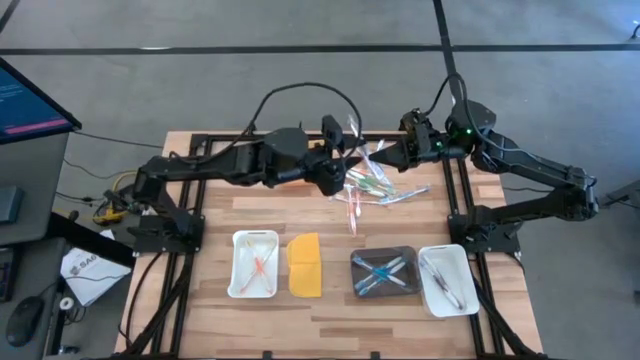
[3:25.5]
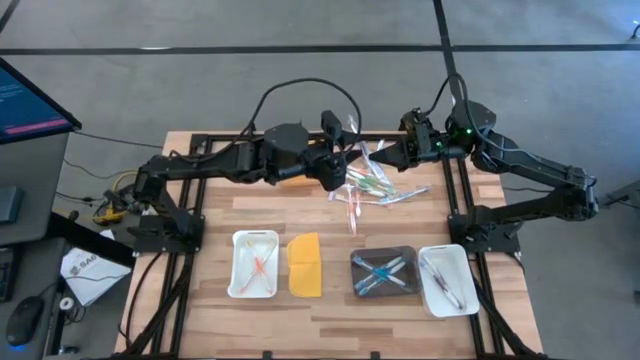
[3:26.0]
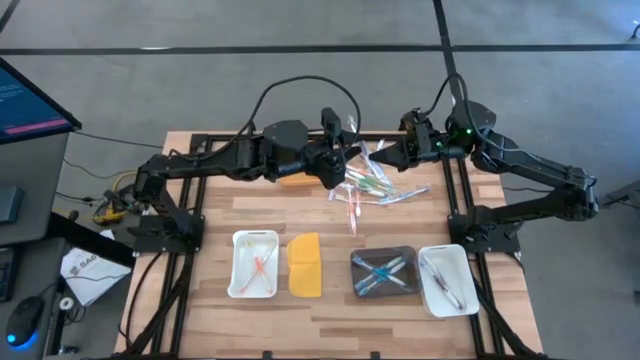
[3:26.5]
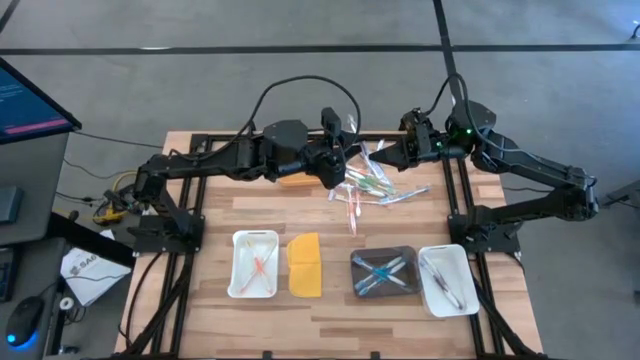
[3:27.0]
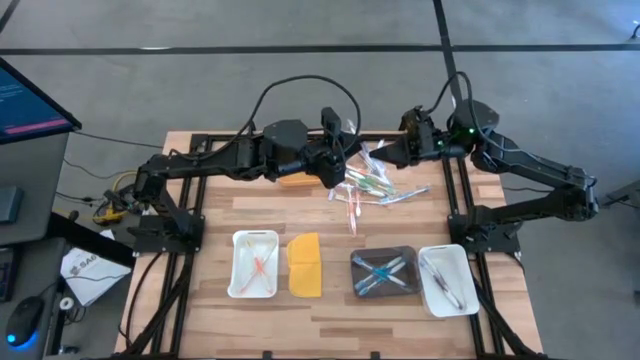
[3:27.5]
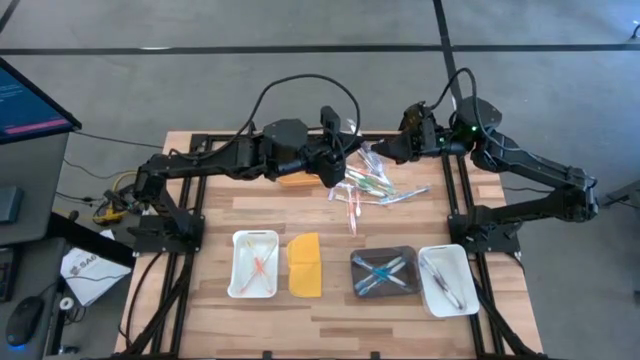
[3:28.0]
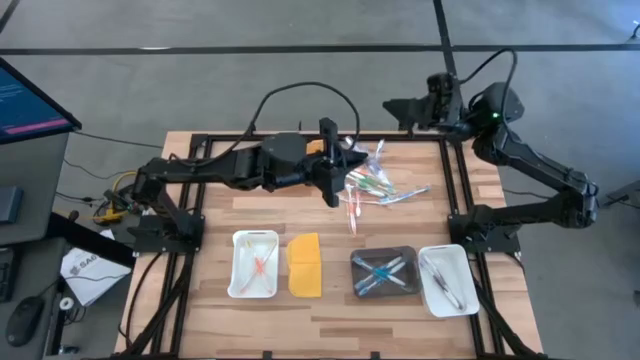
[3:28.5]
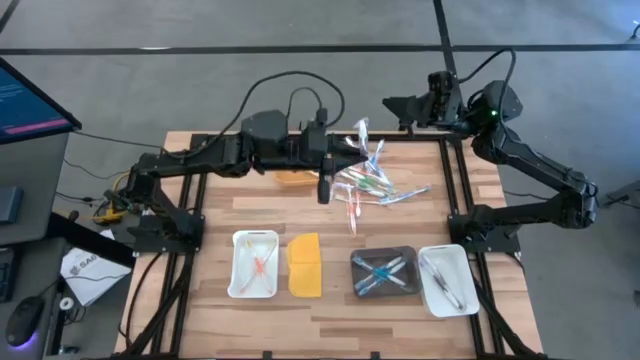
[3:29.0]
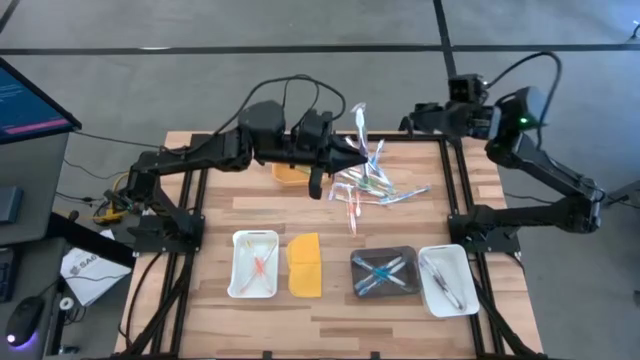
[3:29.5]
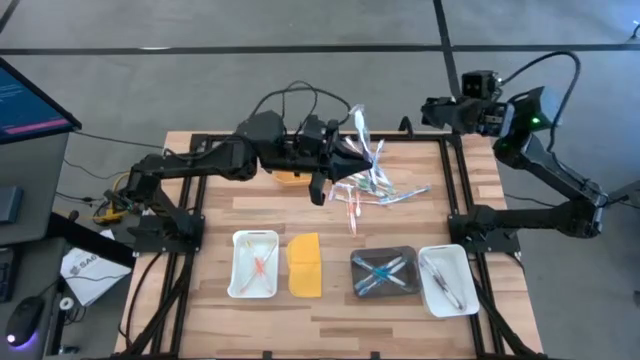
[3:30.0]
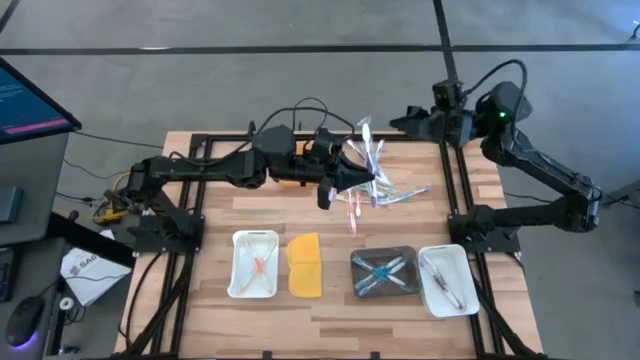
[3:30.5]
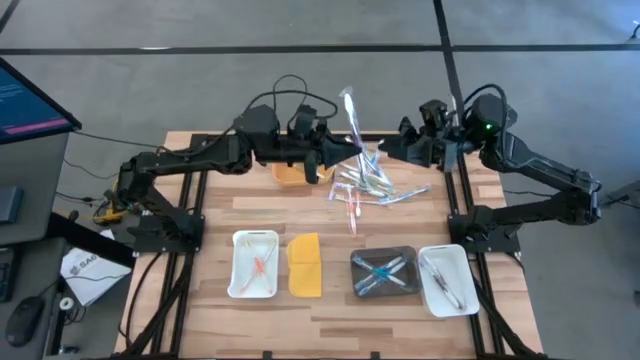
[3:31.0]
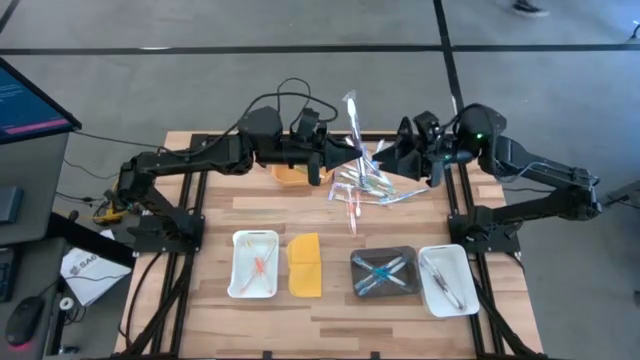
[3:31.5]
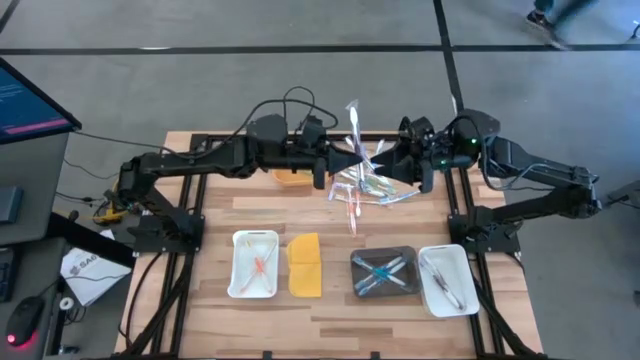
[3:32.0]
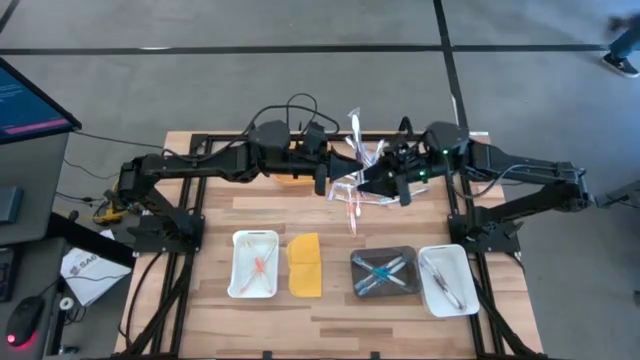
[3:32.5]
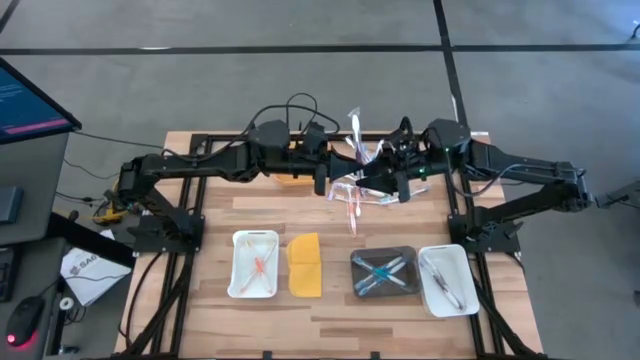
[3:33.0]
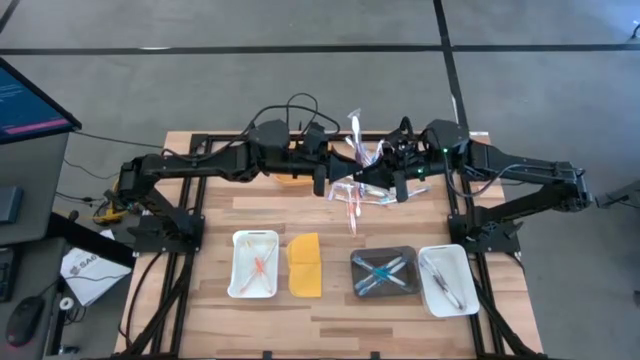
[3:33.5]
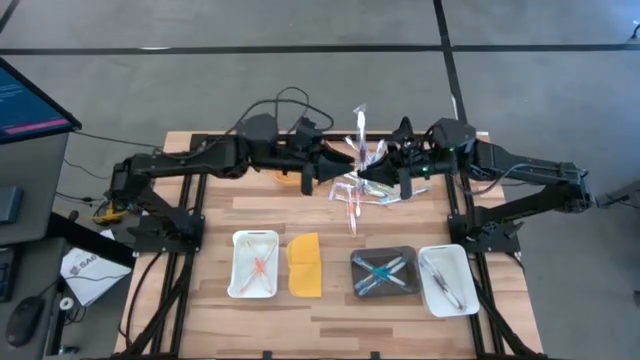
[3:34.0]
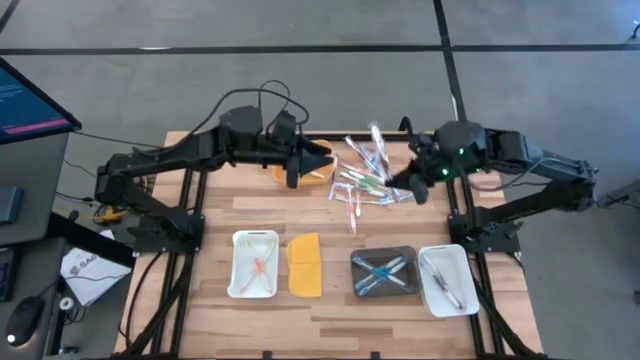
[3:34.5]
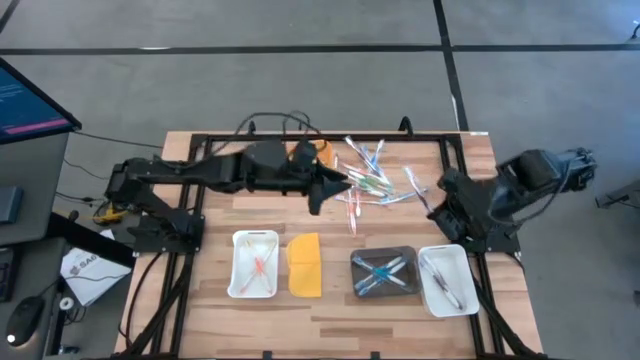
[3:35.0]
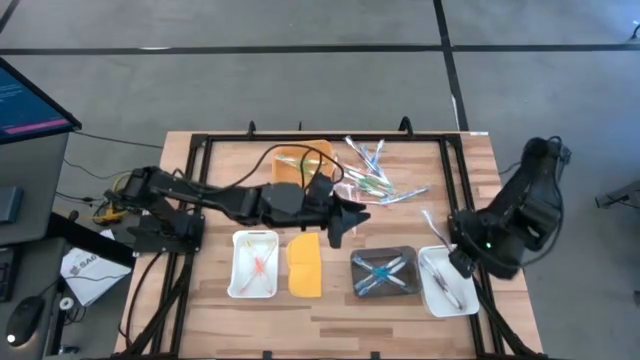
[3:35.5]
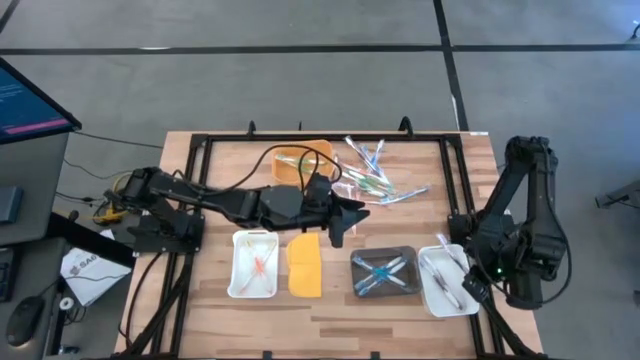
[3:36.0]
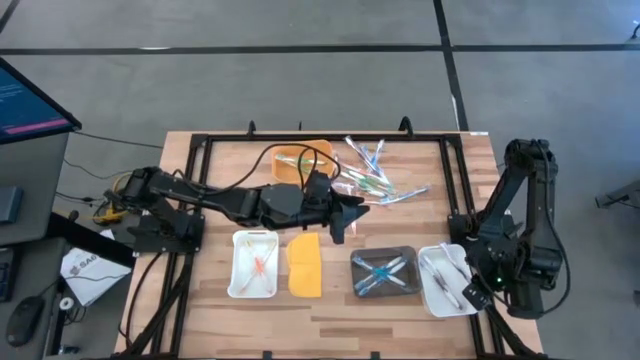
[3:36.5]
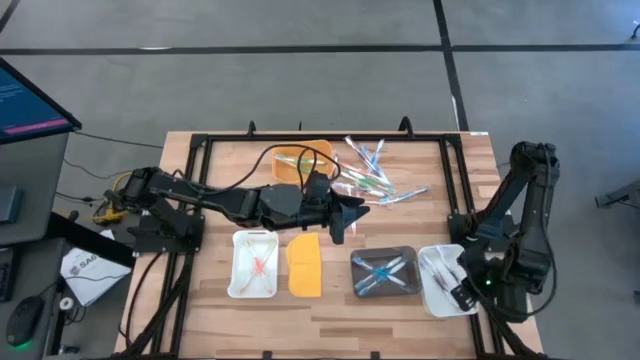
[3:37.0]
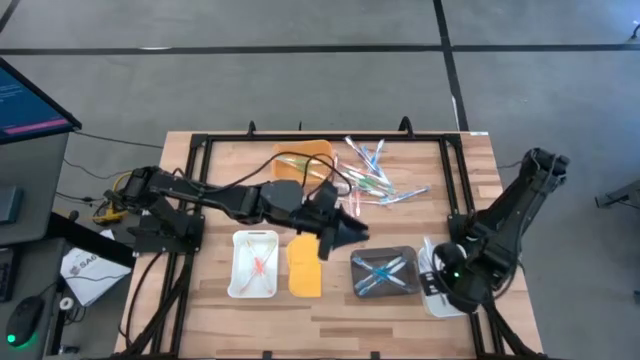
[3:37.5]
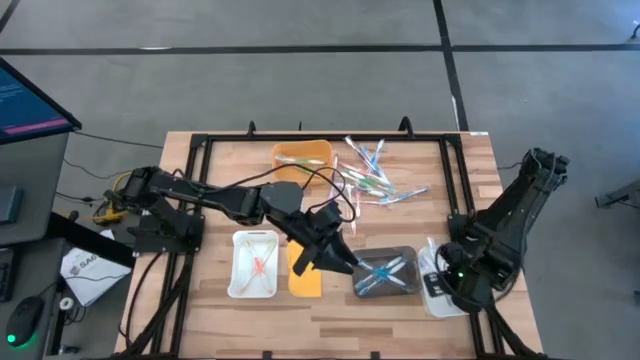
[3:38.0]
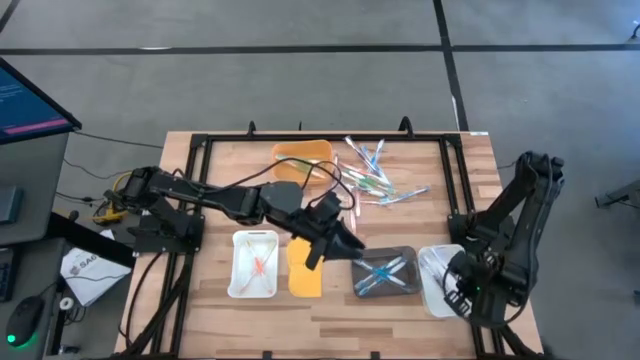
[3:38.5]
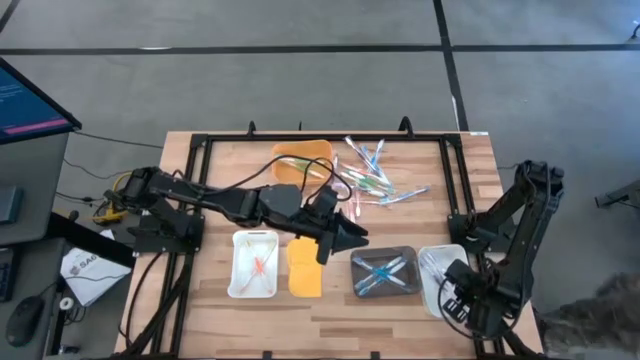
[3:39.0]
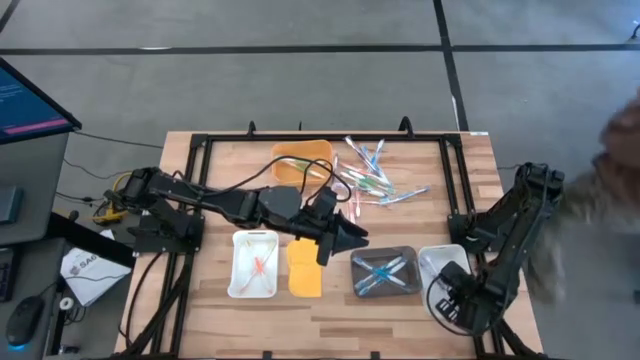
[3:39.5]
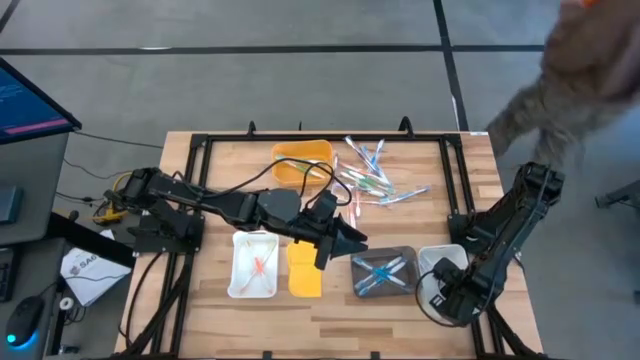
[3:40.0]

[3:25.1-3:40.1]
Task: Pick & Place Toothbrushes
Put the purple toothbrush into the right white bin

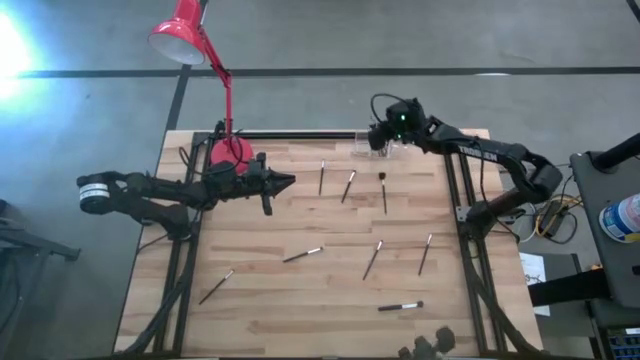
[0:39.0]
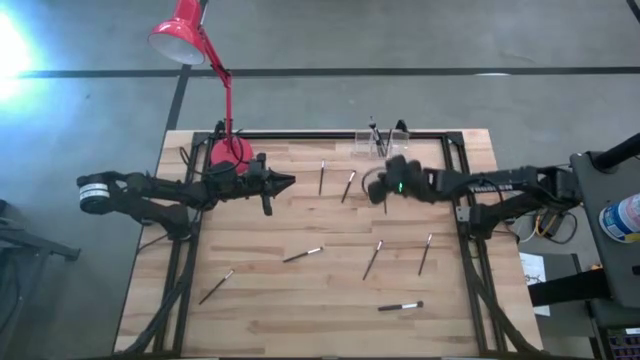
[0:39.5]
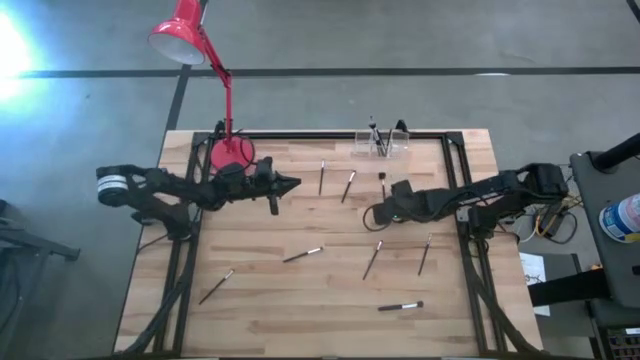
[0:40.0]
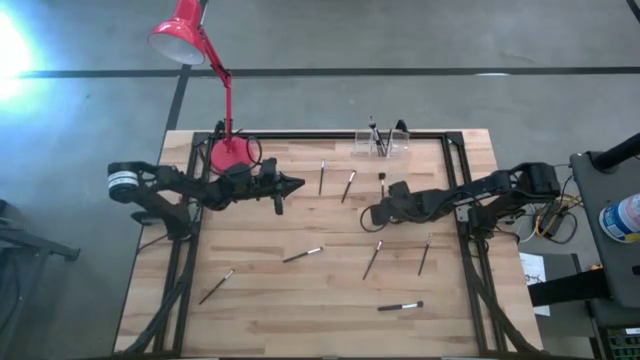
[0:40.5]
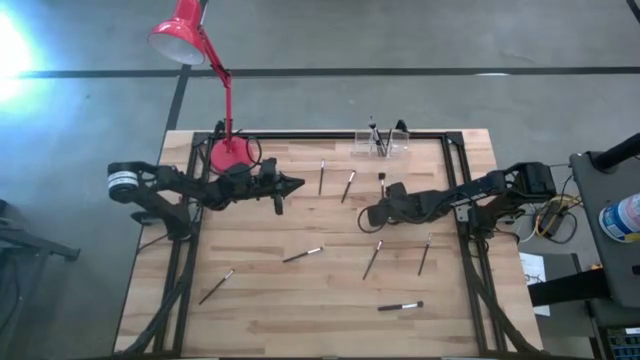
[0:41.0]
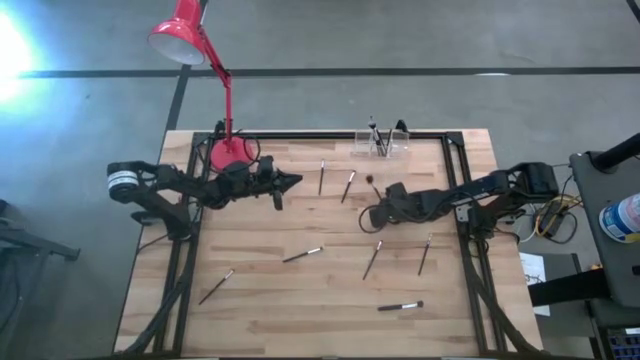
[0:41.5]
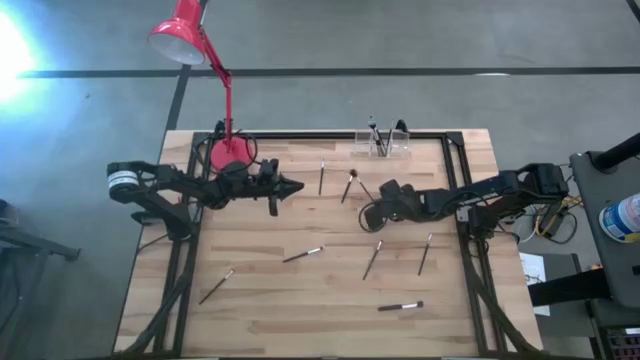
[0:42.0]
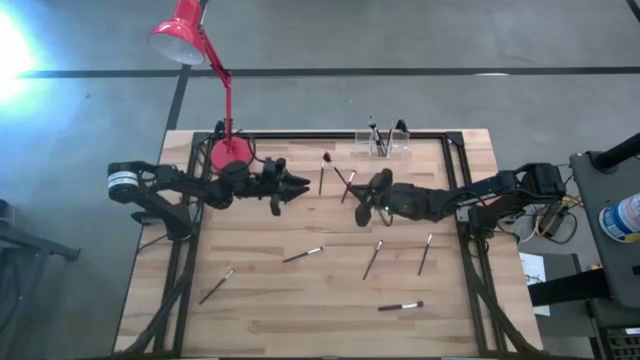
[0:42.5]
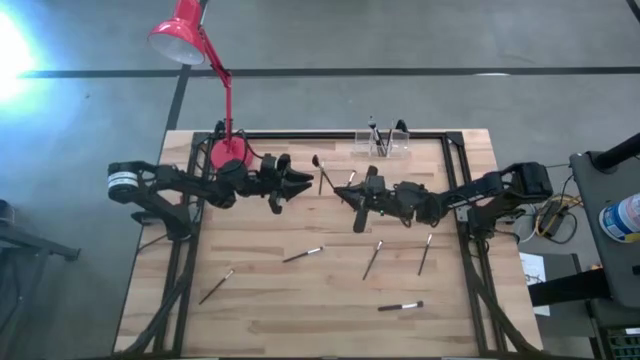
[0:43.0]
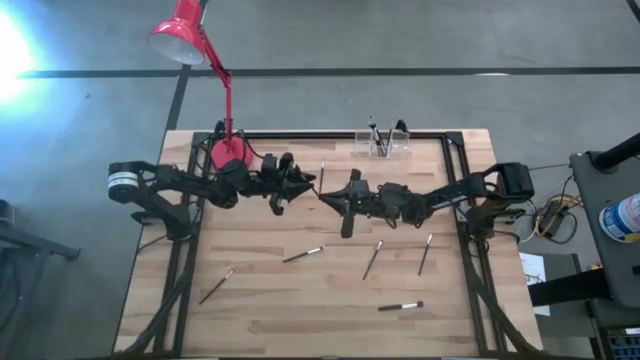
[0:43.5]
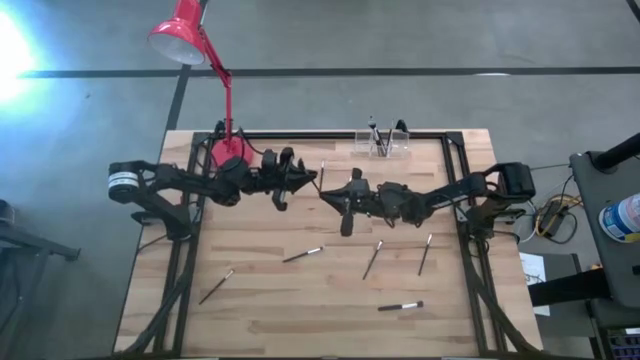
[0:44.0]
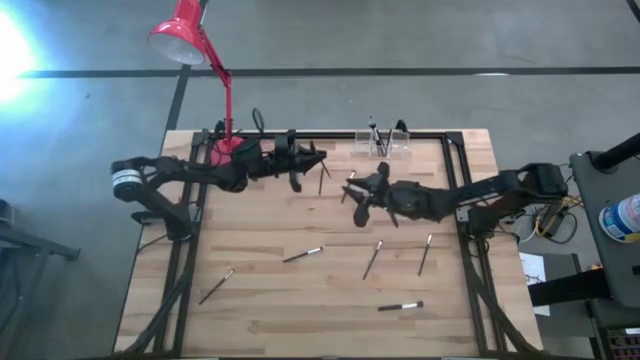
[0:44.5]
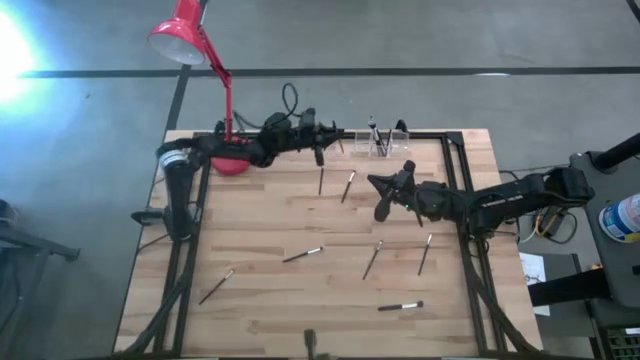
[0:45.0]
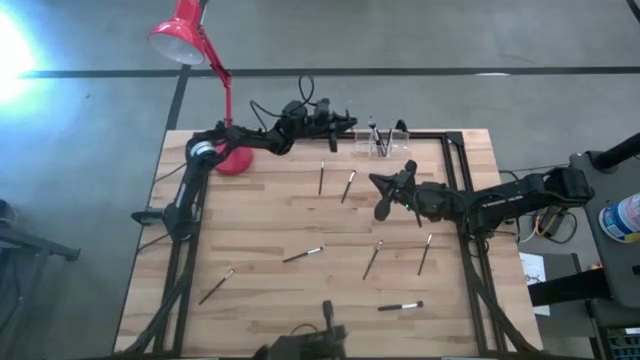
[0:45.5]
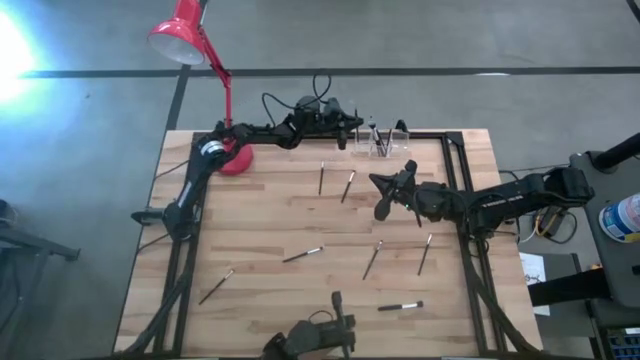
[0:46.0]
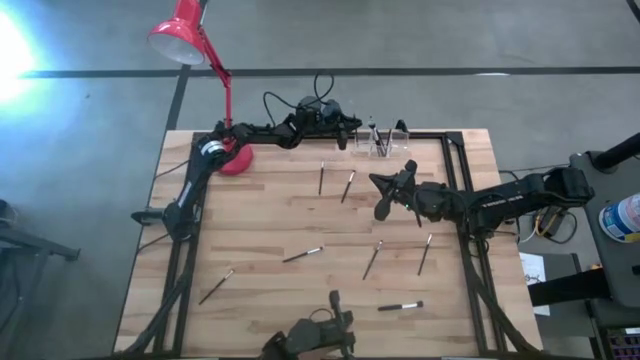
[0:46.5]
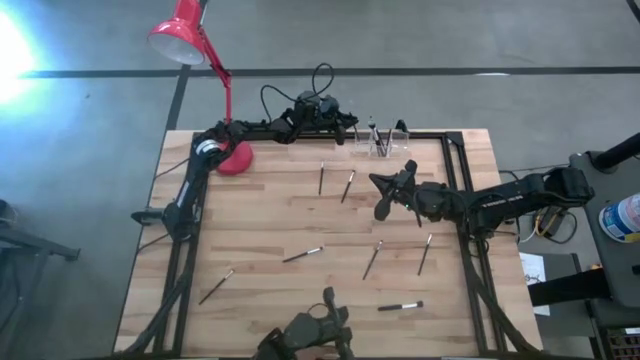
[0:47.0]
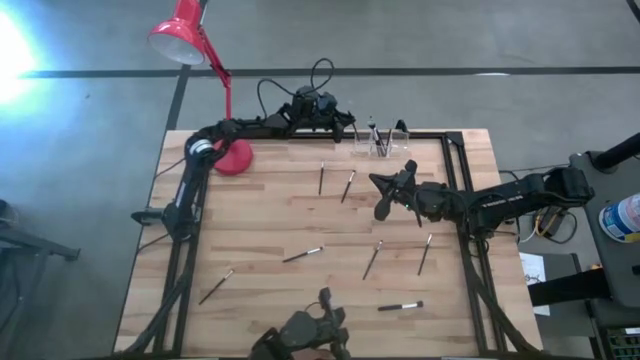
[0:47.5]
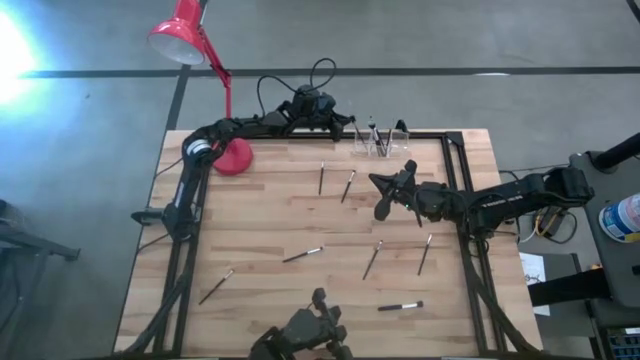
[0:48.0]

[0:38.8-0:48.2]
Task: Put items in baskets/containers
Put the eyebrow brush into the transparent organizer
